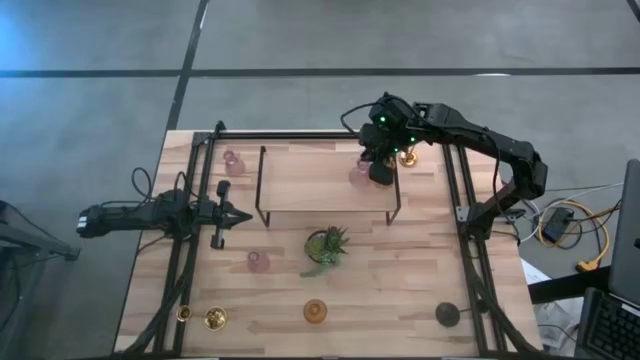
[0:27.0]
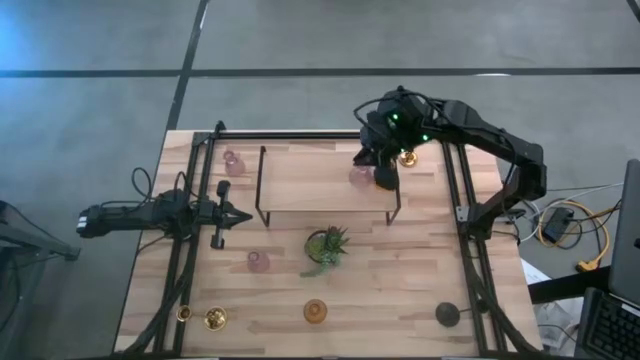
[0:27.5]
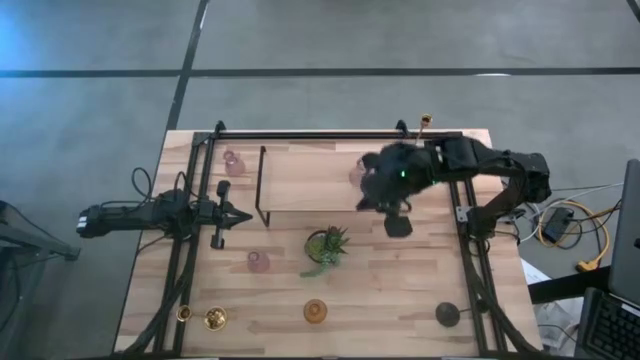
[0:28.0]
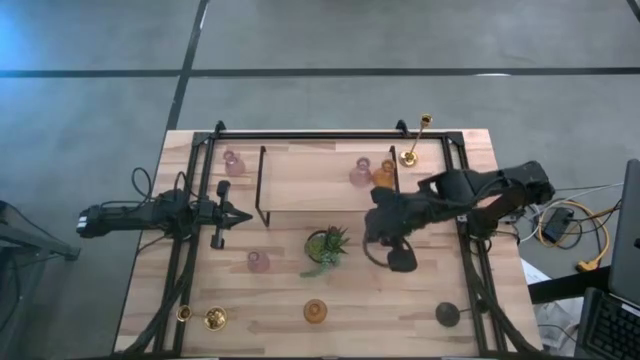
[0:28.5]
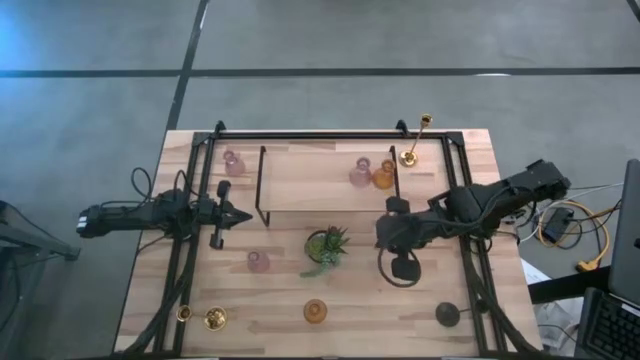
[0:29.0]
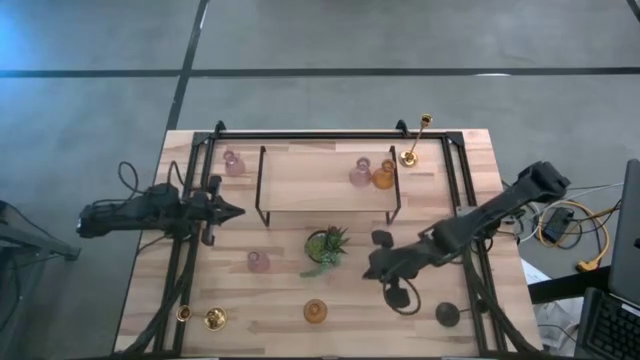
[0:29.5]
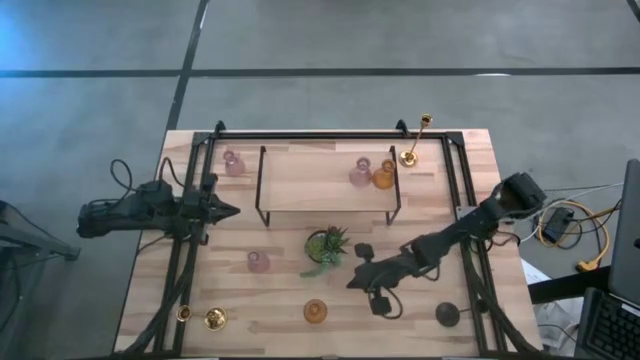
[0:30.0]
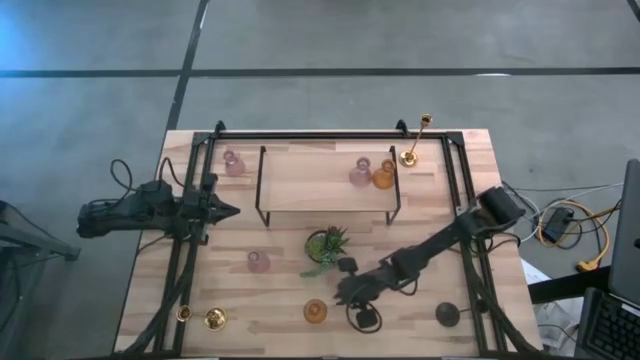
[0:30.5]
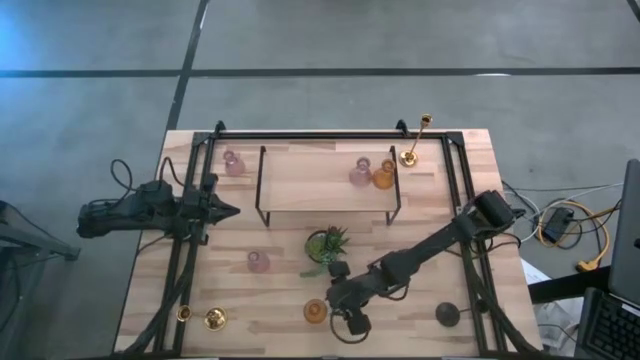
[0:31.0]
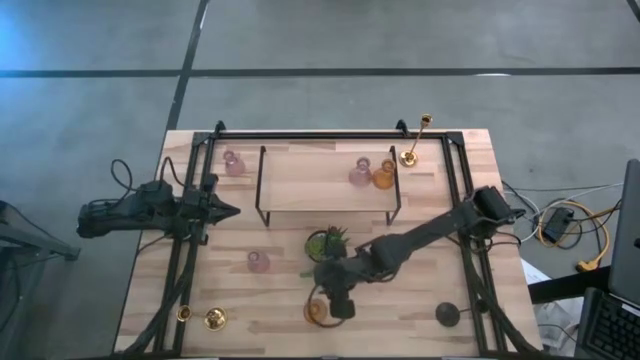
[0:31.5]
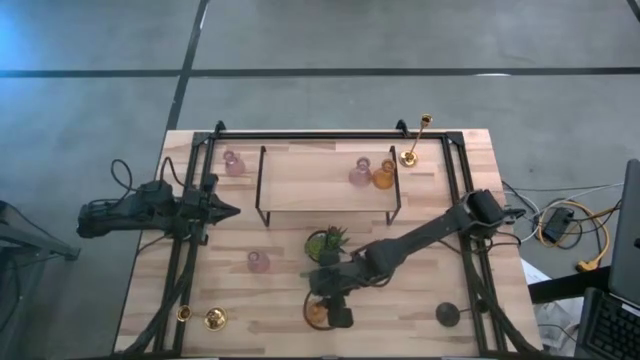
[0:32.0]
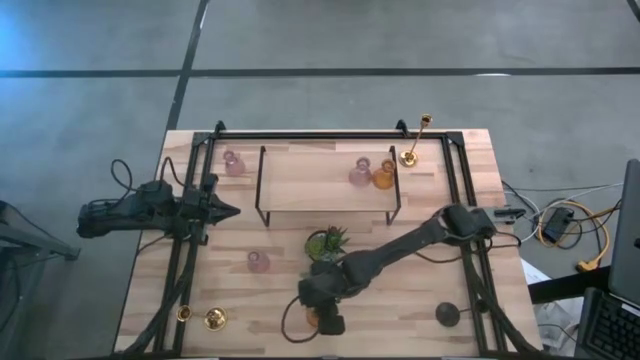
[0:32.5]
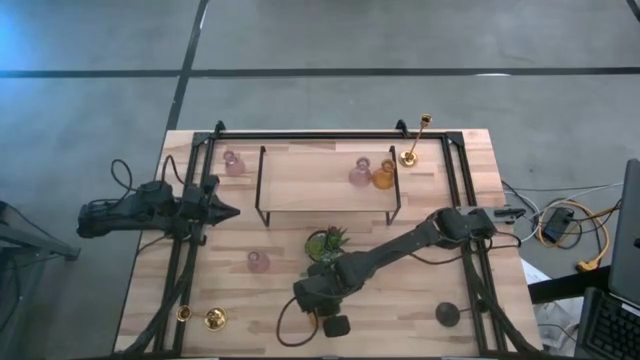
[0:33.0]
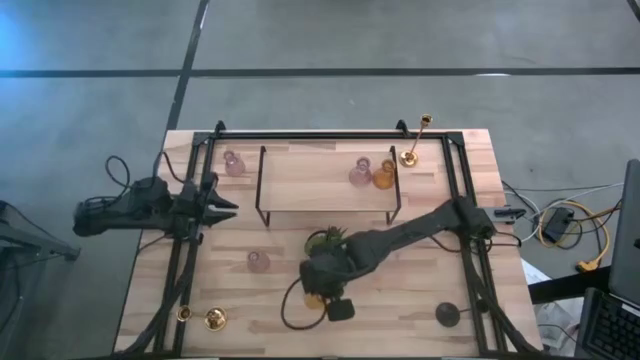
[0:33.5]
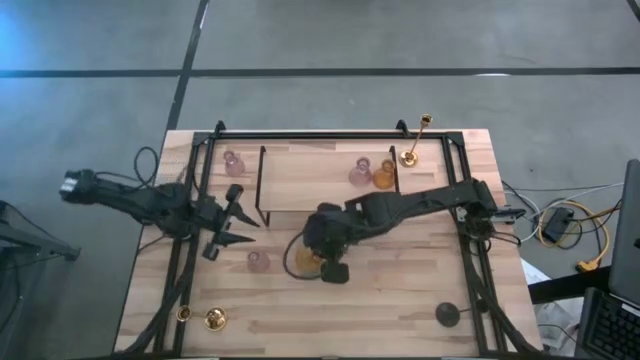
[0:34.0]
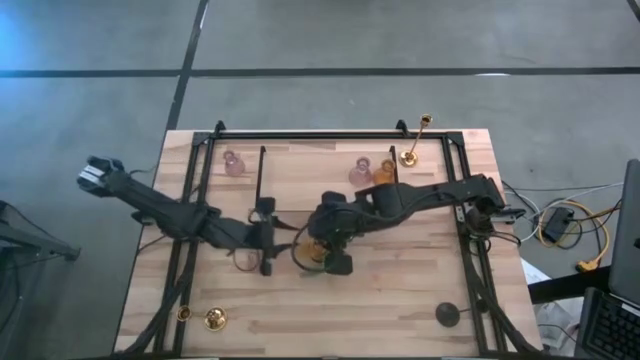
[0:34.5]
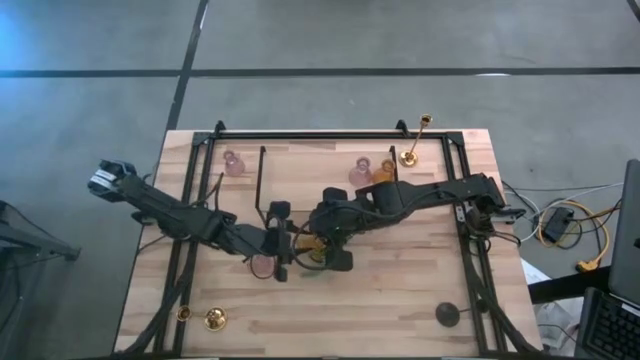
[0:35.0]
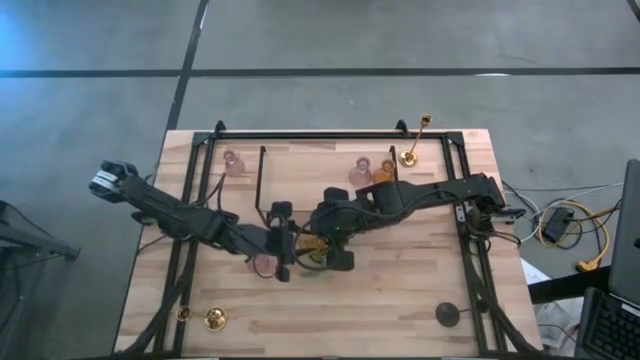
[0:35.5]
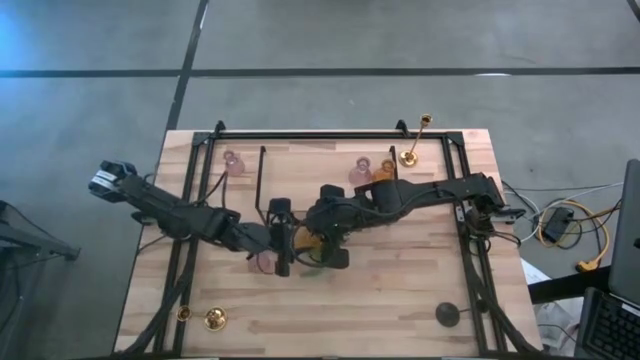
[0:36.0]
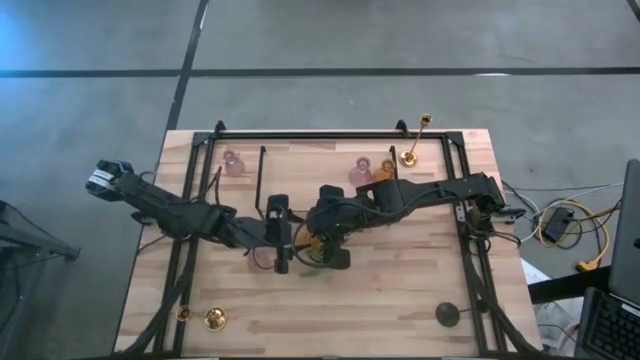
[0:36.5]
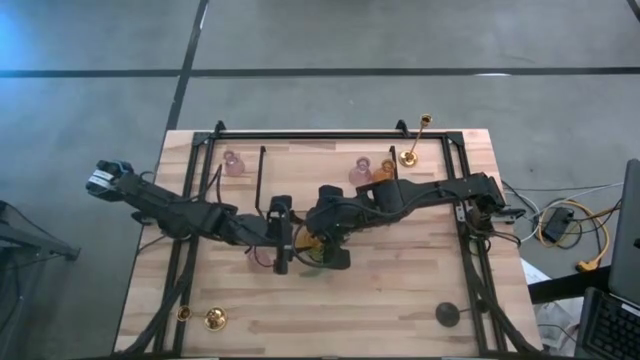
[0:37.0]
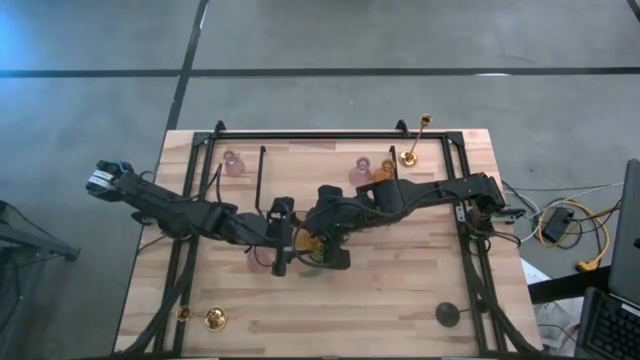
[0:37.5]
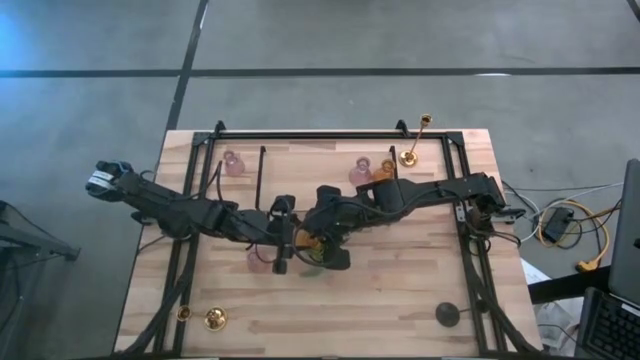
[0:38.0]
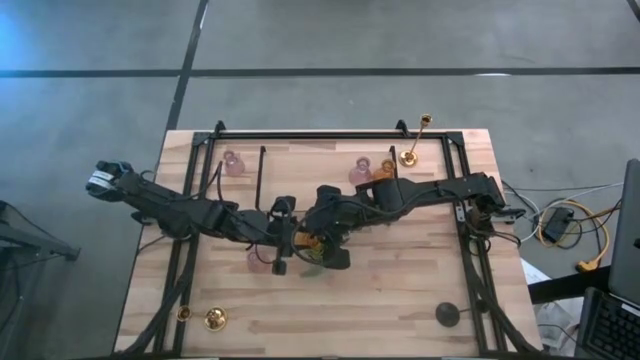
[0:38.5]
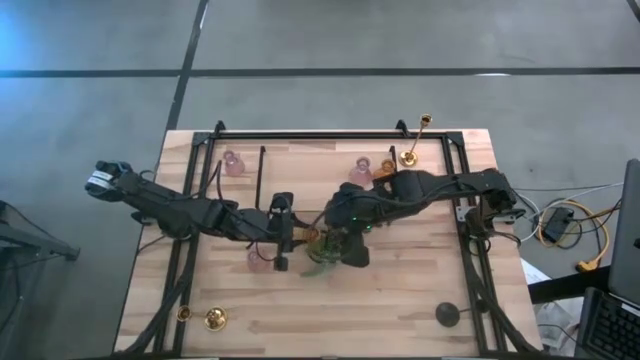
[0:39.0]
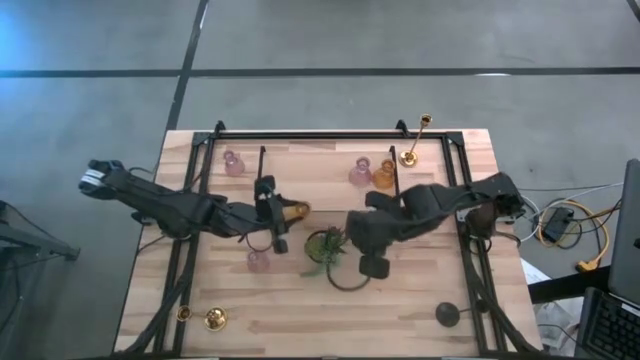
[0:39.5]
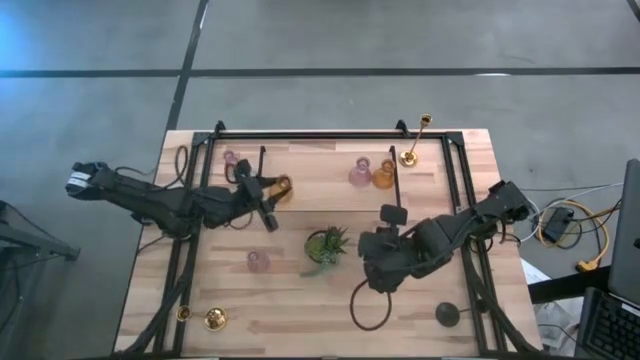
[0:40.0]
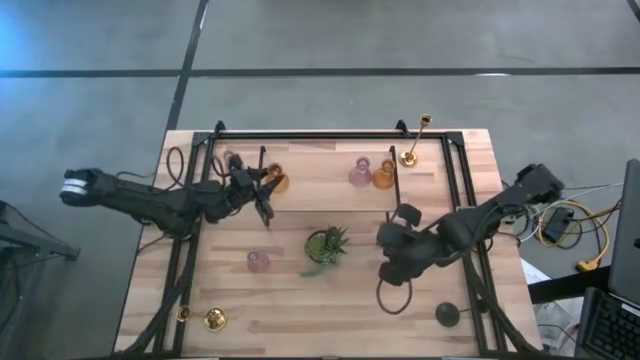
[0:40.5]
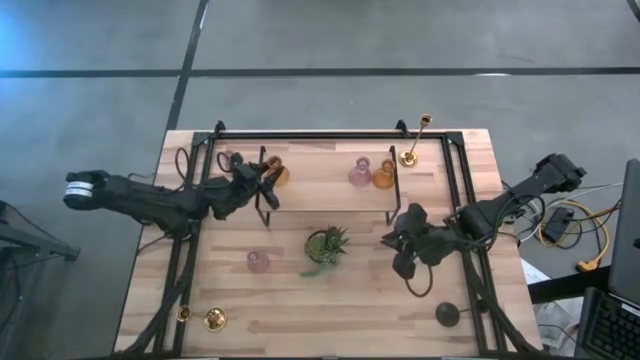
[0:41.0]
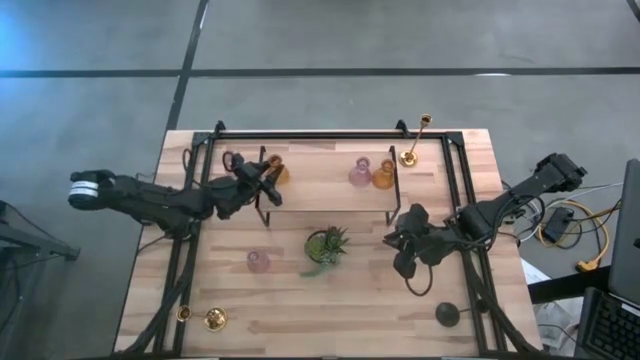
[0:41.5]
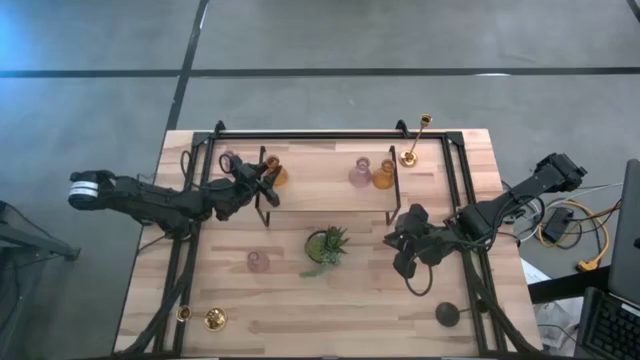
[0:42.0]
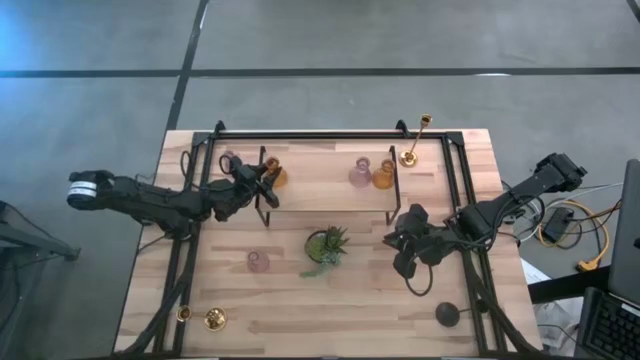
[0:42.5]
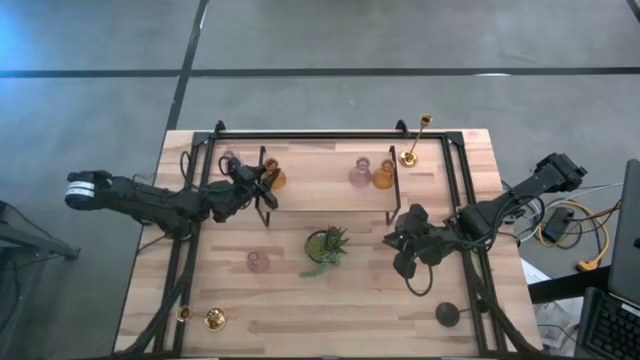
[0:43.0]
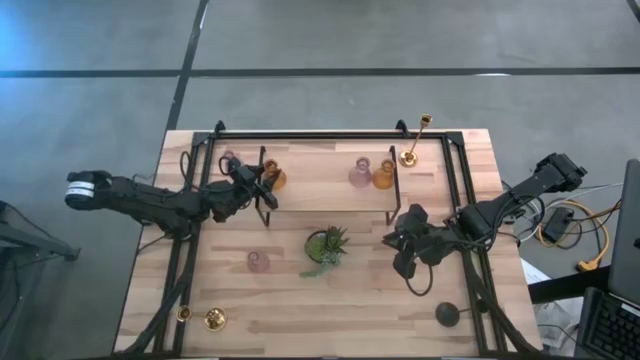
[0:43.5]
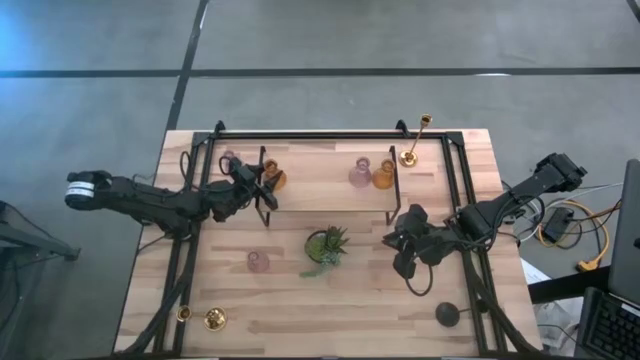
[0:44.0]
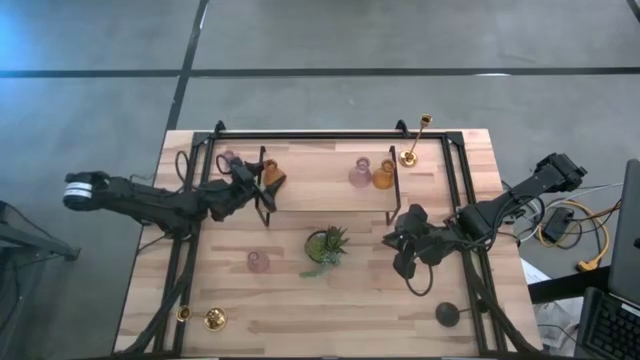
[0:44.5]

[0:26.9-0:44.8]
Task: Pick & Place candle stick holders
Put the yellow glass candle holder on the shelf

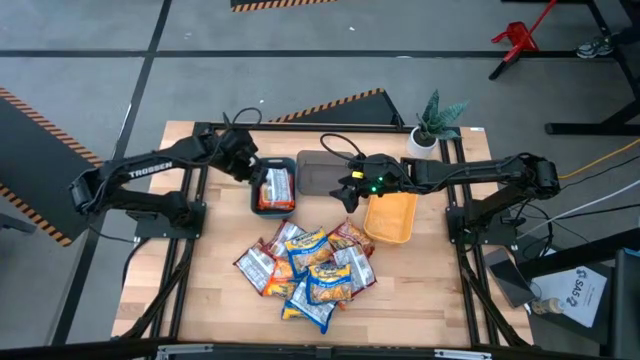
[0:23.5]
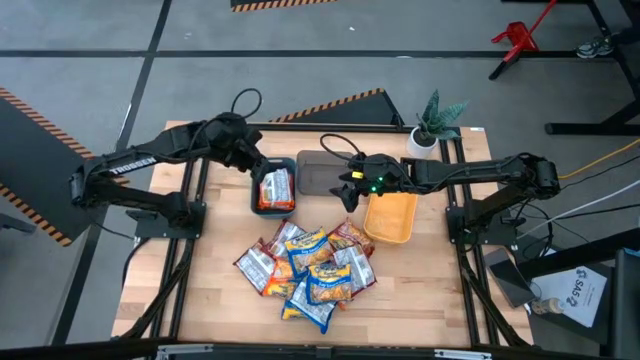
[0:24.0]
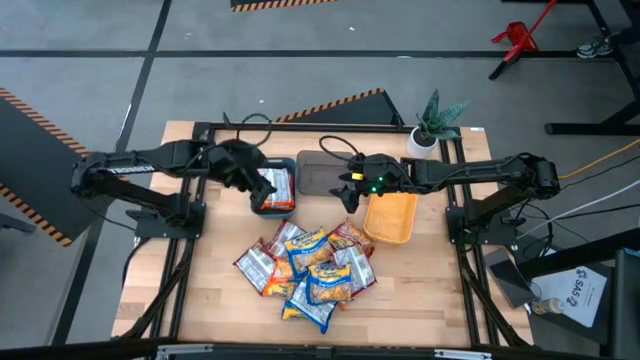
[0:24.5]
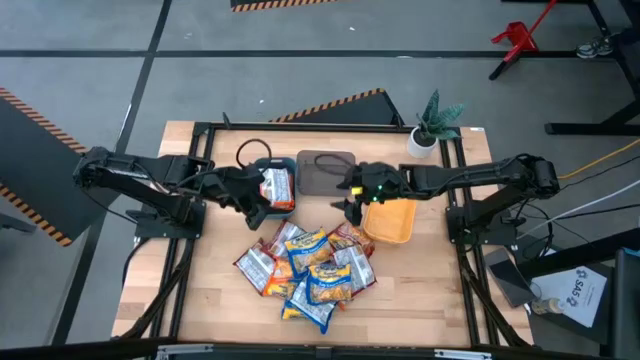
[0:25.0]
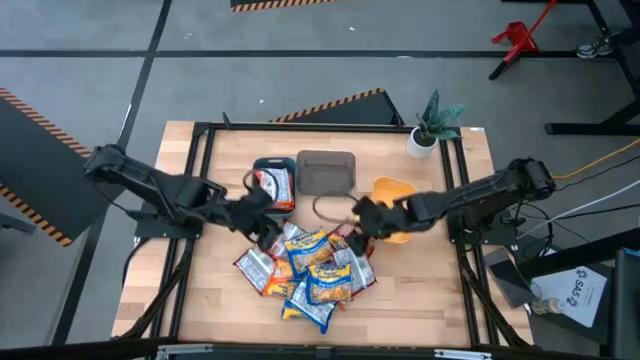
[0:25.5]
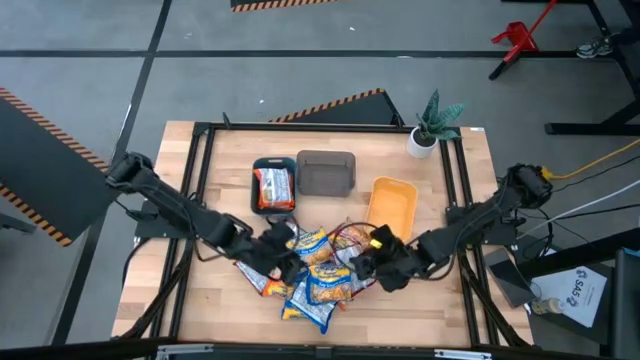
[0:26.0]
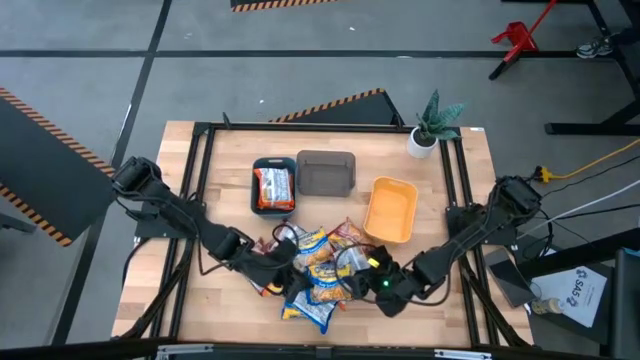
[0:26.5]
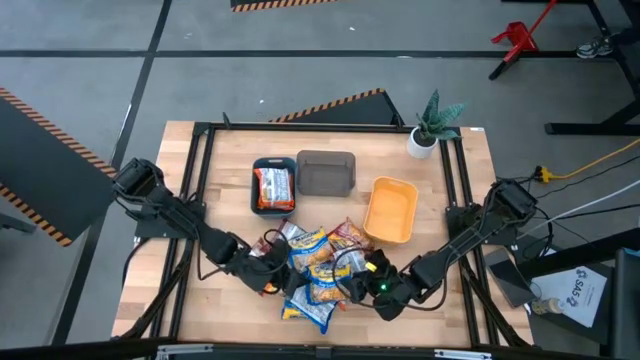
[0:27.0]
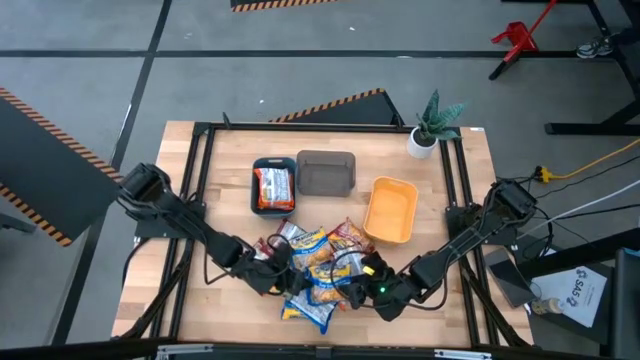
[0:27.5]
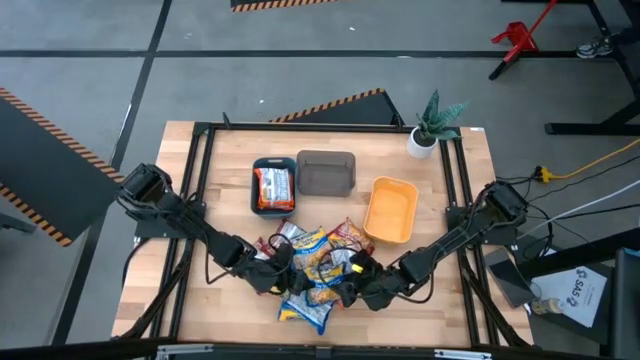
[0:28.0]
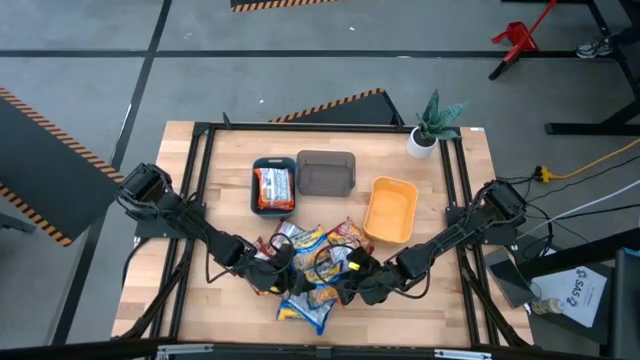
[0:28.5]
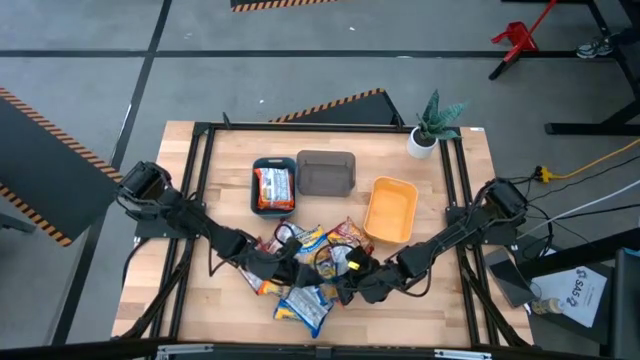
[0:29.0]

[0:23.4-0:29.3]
Task: Sort Maruchan noodles
Put the blue noodle pack into the black bin
